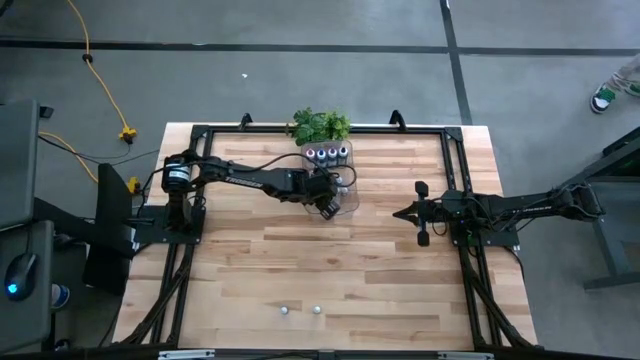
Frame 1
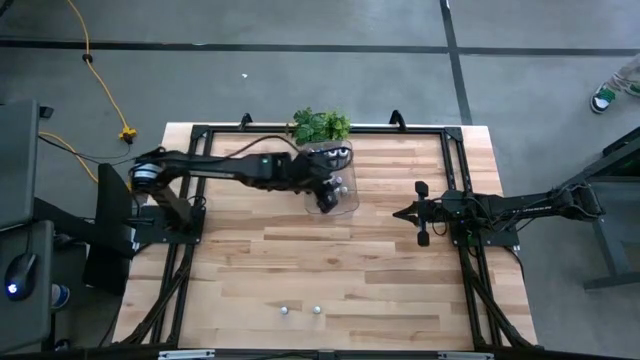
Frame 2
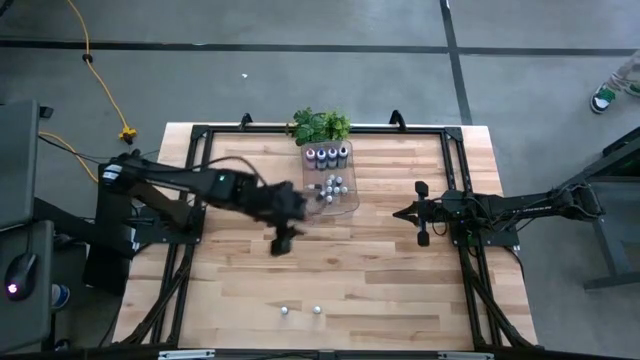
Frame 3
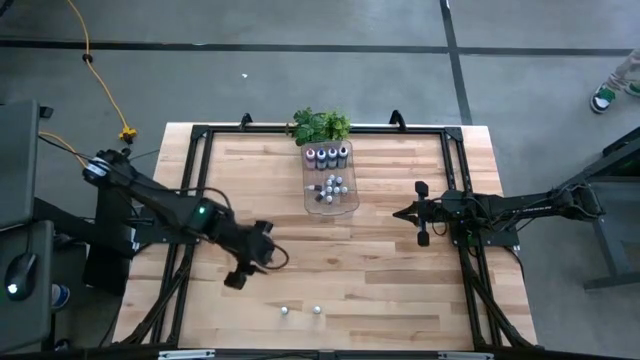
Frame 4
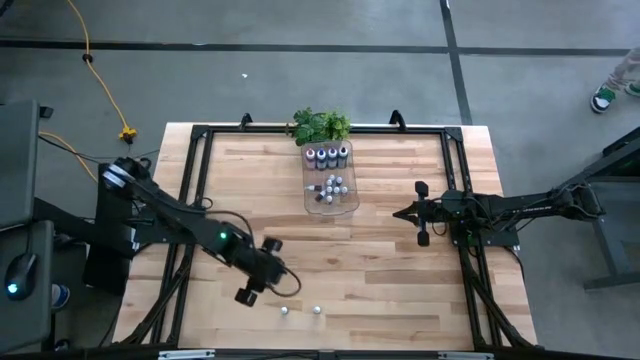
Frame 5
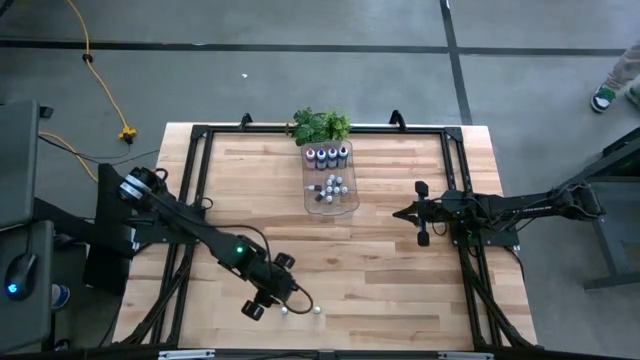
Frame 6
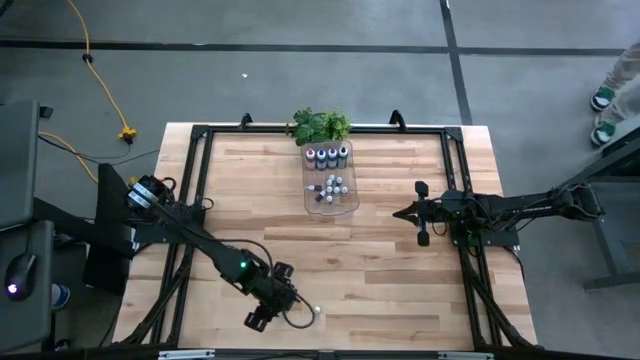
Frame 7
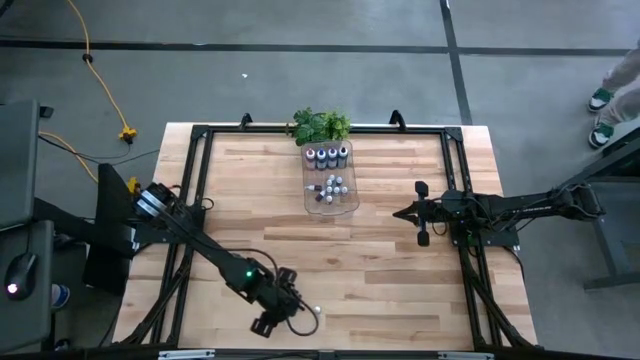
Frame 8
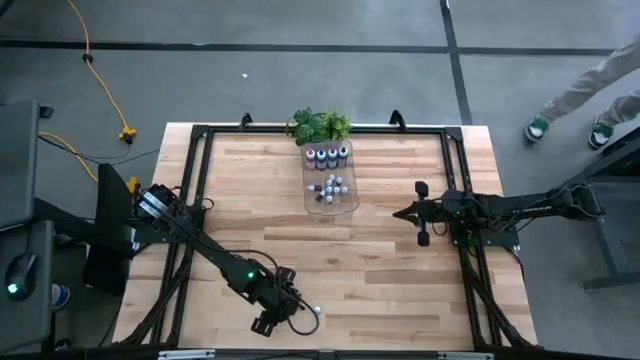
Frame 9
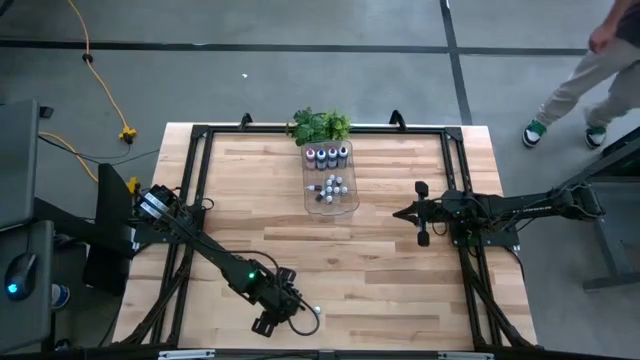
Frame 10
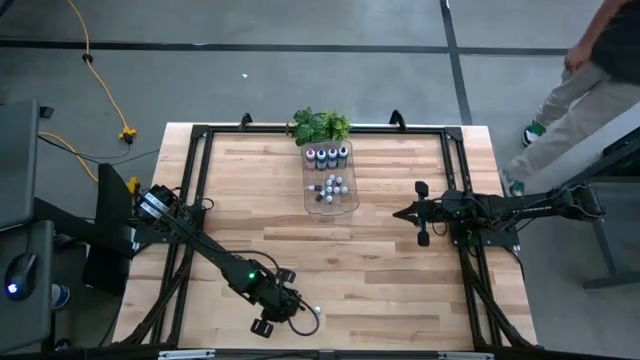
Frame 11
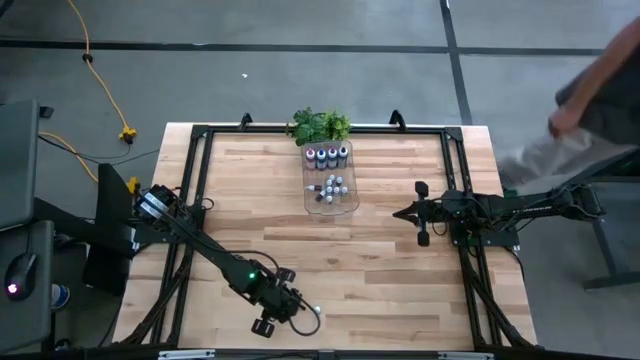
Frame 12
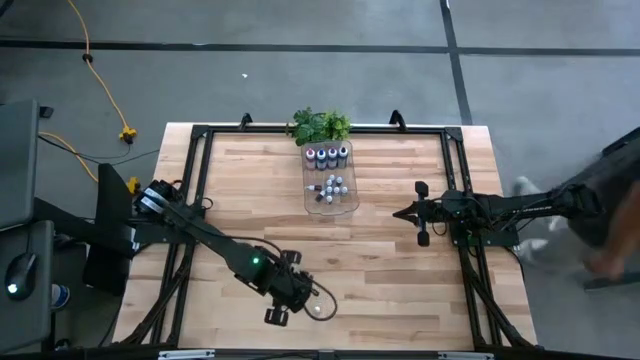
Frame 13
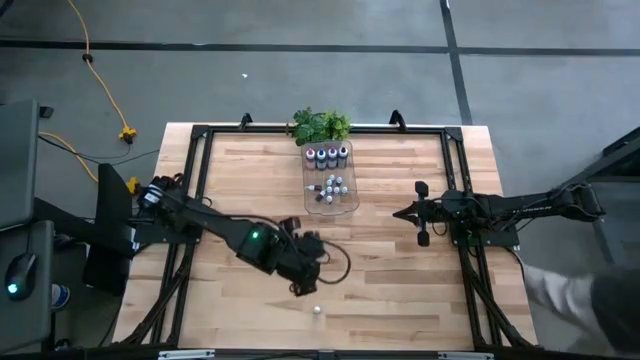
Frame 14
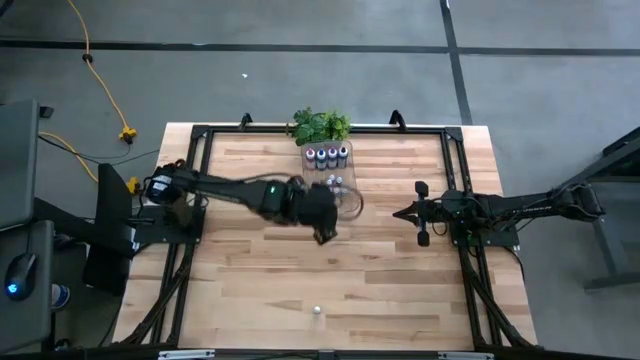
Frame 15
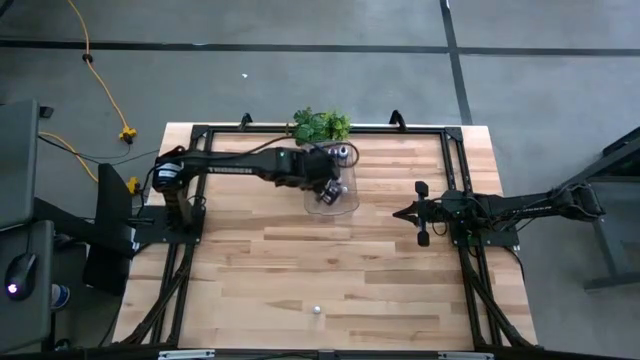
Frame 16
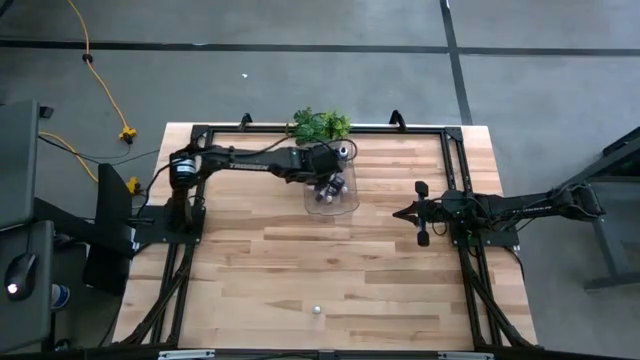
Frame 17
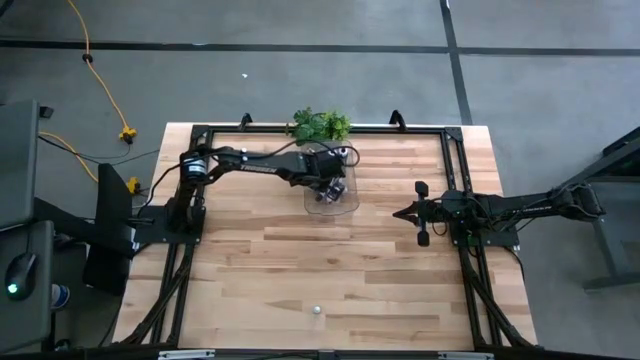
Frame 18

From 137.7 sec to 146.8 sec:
Task: Pick & Place food coloring
Put the small black food coloring bottle into the transparent bin

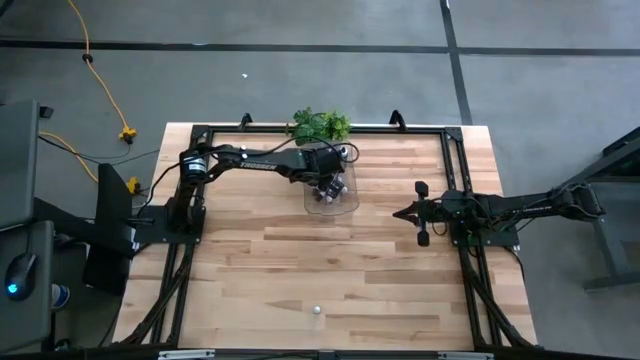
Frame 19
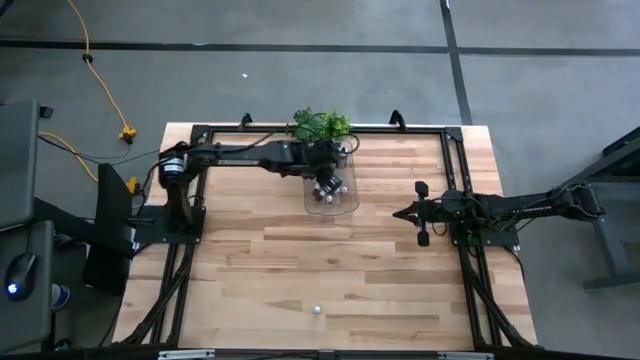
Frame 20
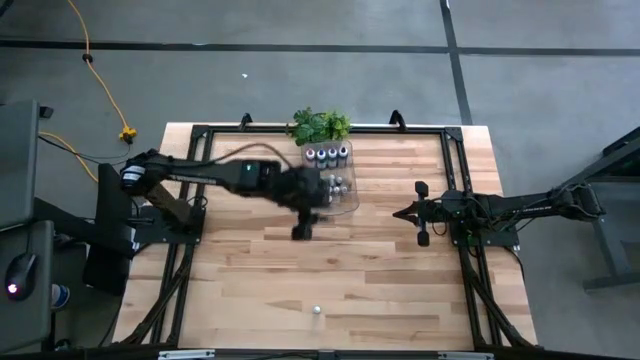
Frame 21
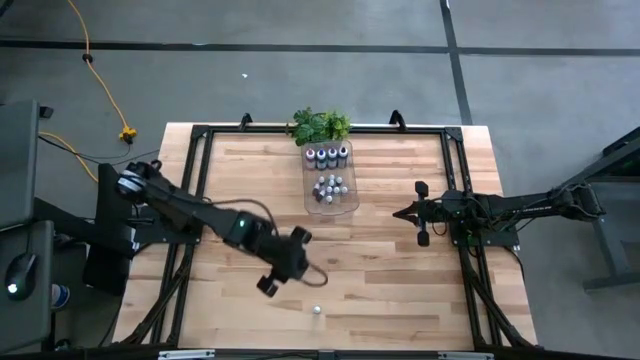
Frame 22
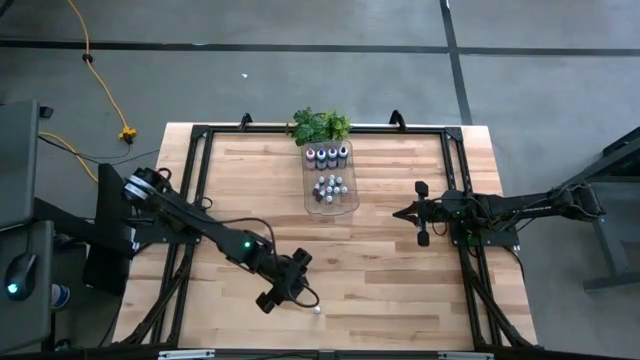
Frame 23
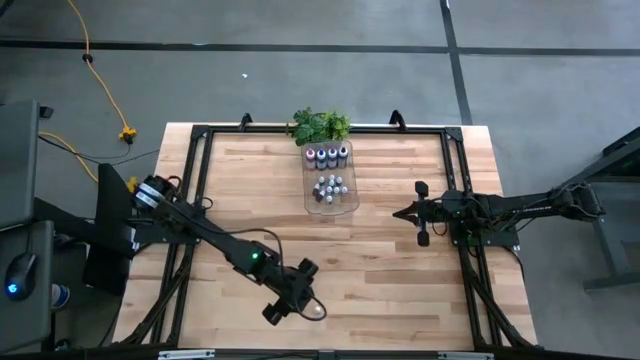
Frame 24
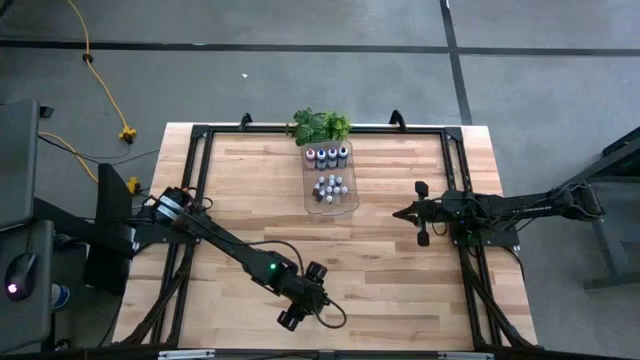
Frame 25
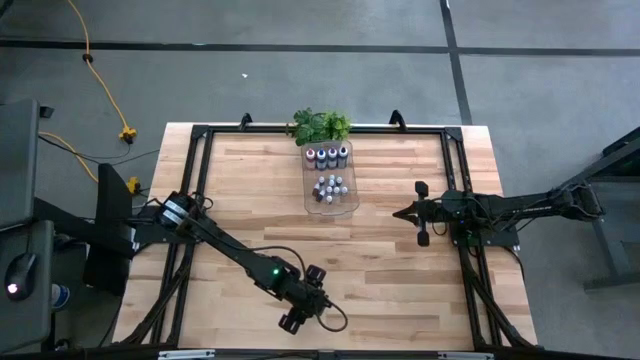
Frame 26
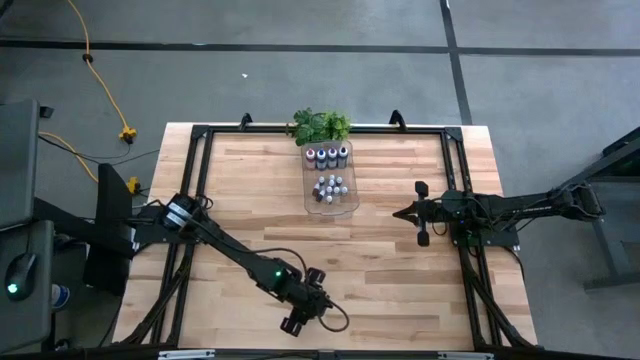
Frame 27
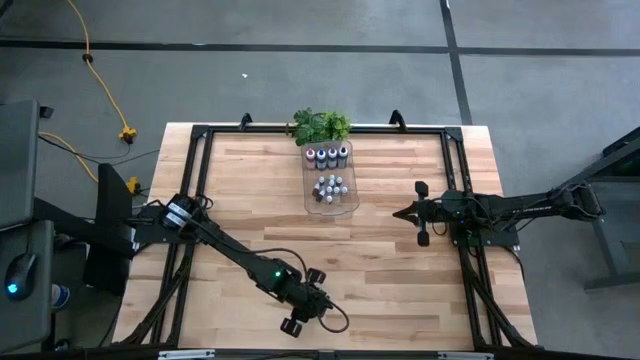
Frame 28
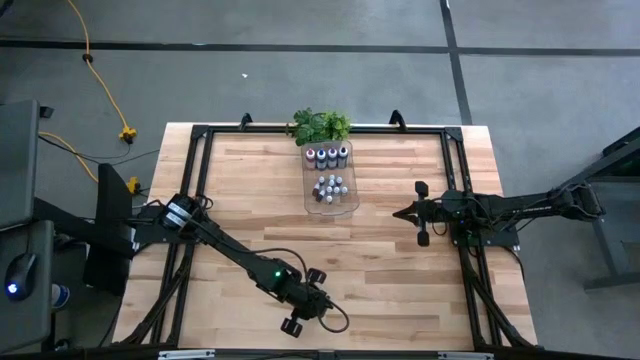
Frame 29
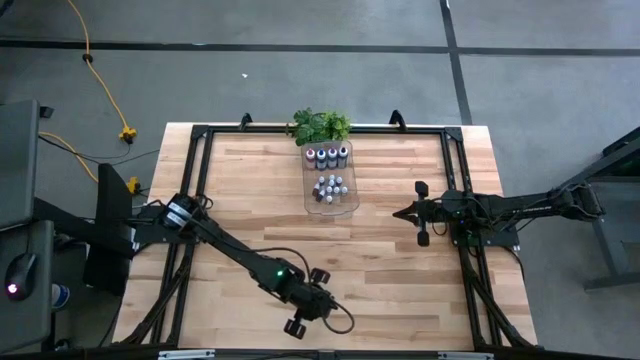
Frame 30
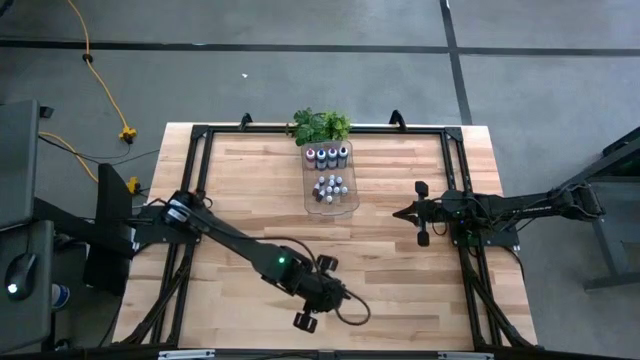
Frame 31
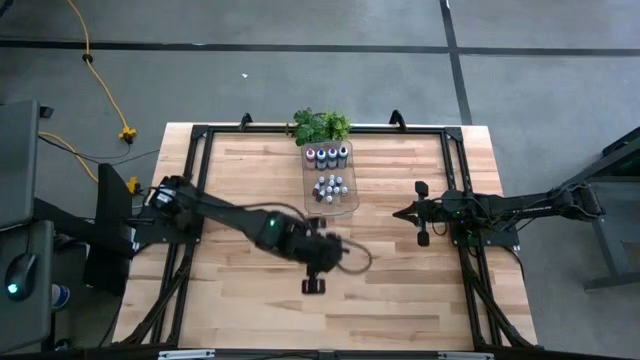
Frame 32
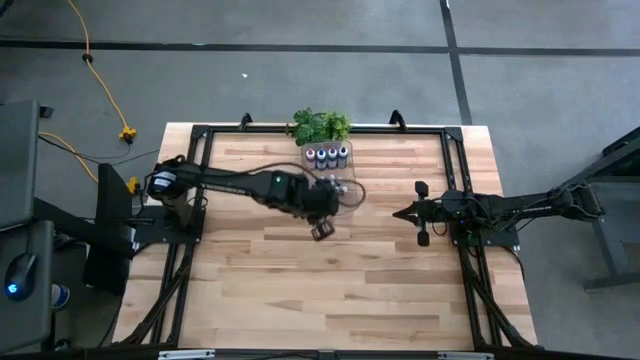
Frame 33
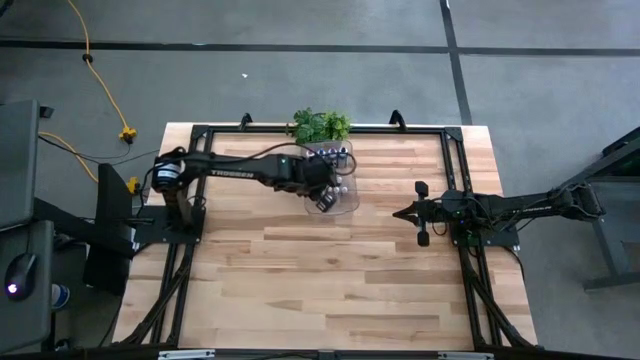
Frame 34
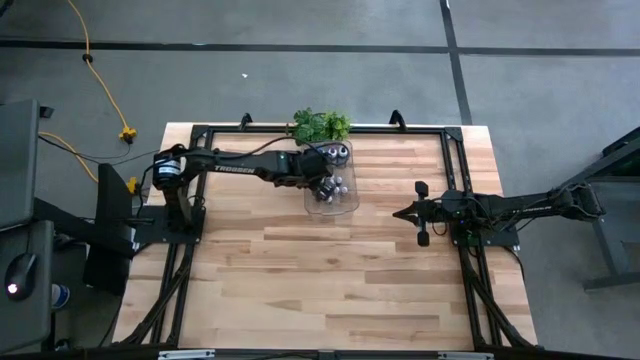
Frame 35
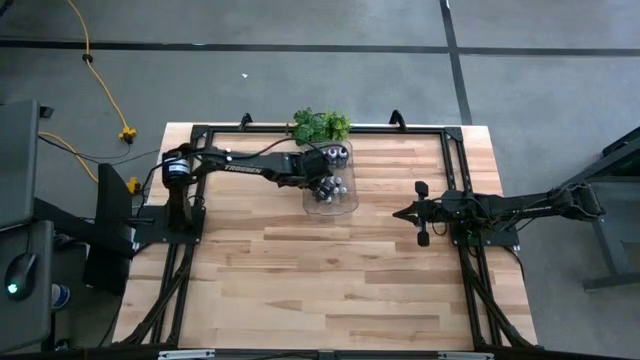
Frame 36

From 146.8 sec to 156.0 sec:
Put the small dark green food coloring bottle into the transparent bin

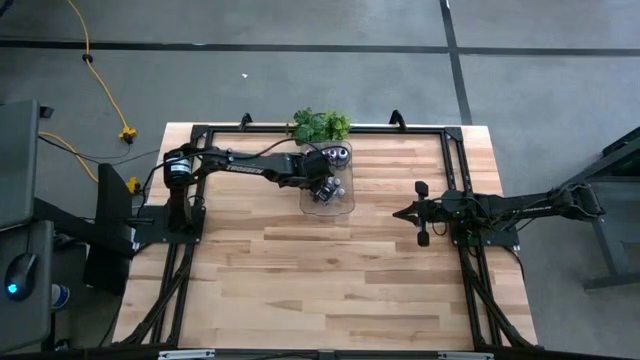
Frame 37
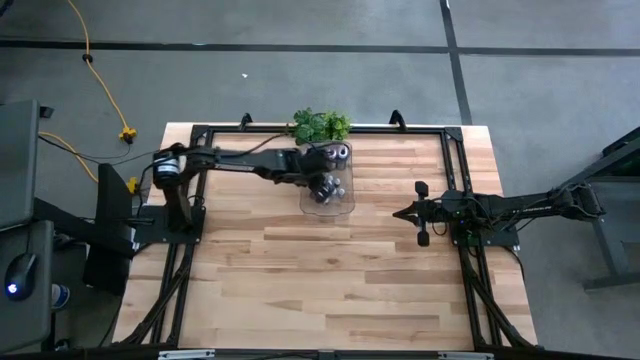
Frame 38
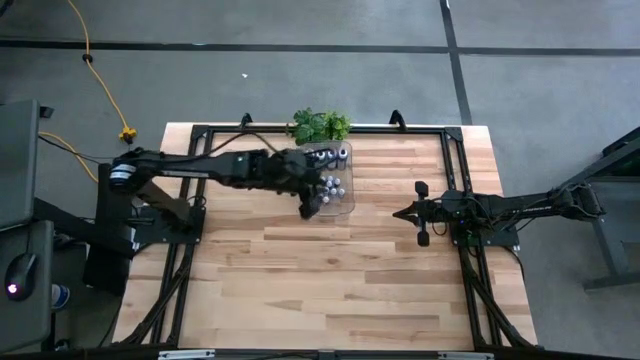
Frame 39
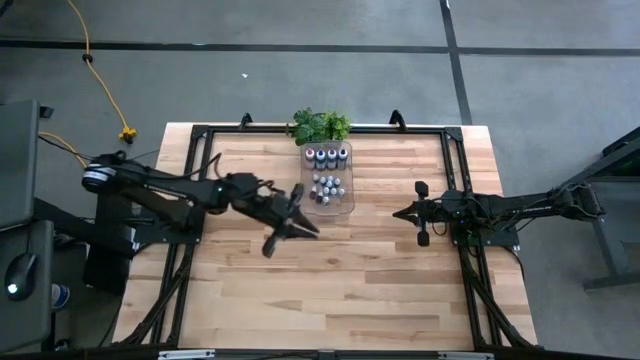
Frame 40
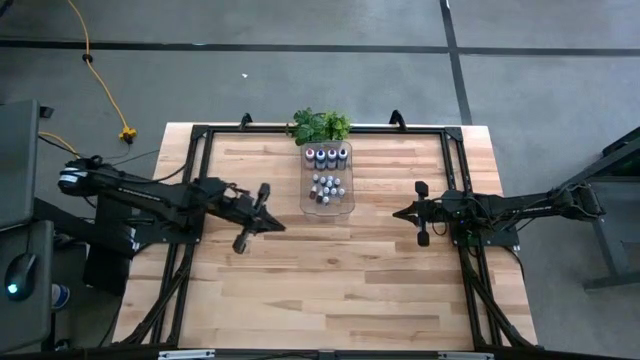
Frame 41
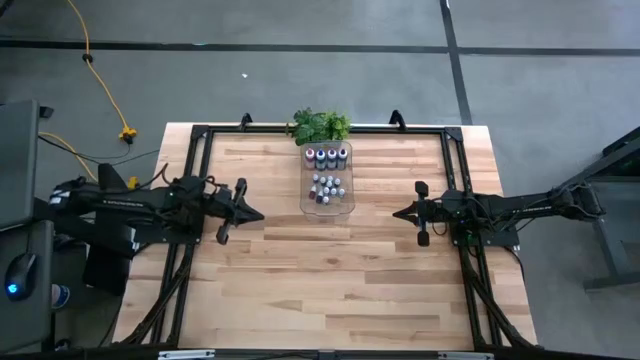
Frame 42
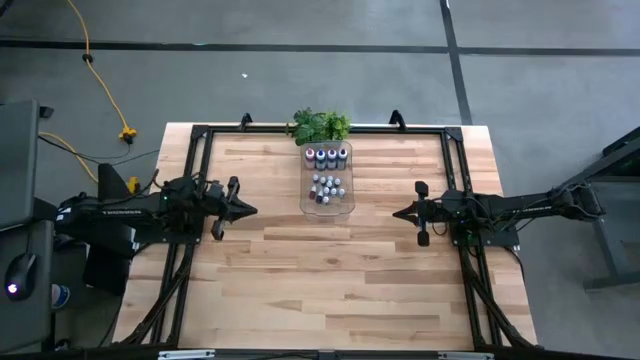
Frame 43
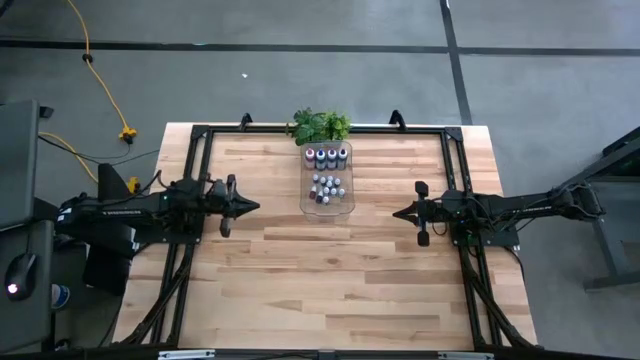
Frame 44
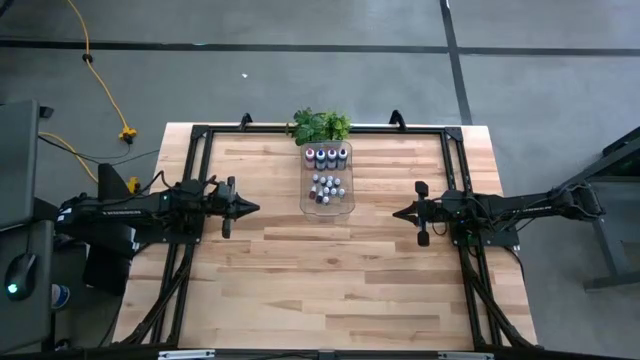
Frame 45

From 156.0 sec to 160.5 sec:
Return to Home Position
